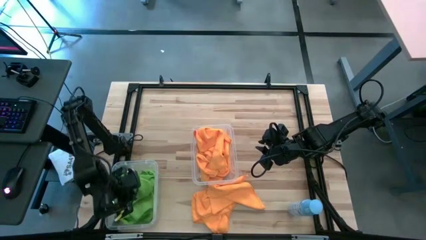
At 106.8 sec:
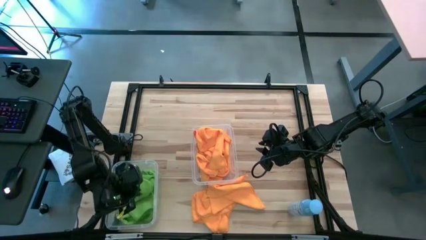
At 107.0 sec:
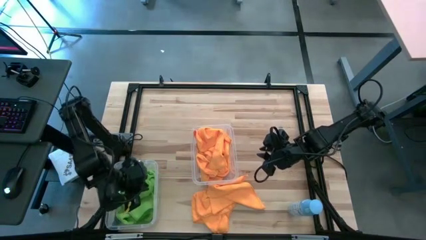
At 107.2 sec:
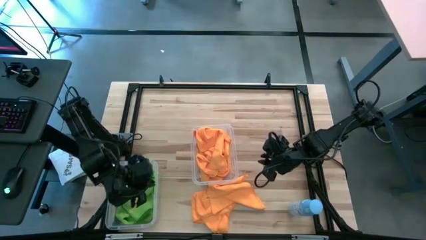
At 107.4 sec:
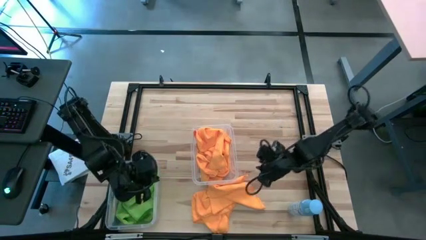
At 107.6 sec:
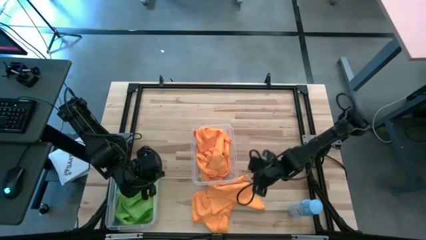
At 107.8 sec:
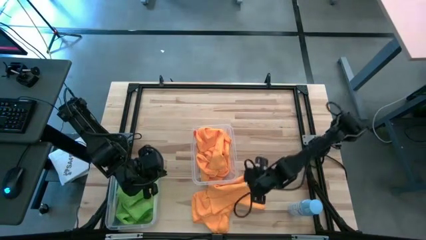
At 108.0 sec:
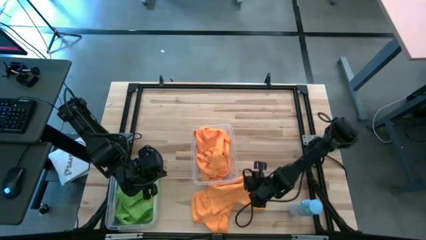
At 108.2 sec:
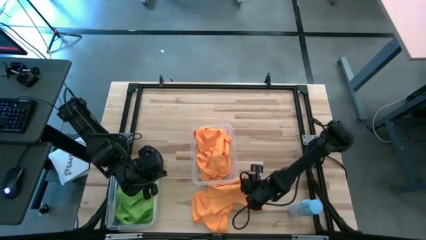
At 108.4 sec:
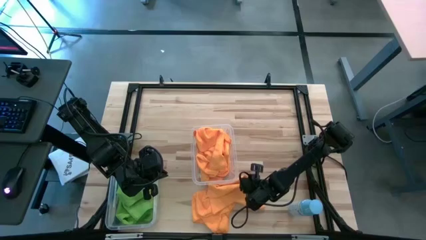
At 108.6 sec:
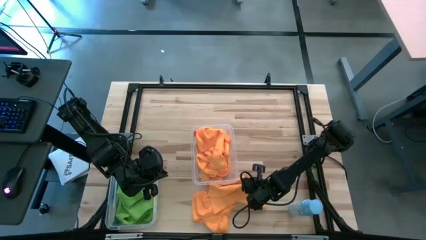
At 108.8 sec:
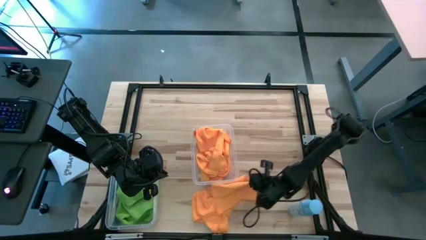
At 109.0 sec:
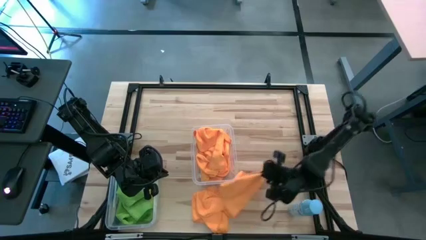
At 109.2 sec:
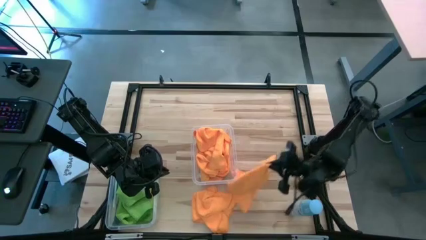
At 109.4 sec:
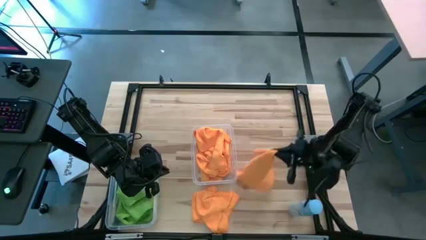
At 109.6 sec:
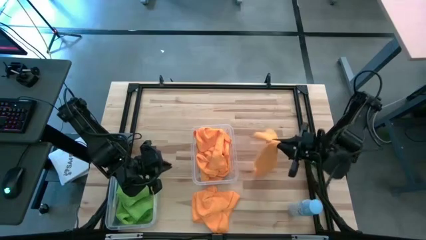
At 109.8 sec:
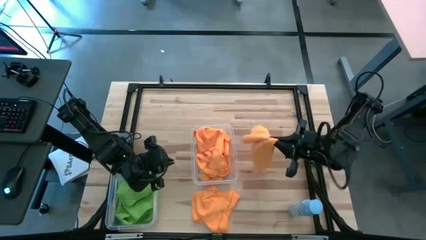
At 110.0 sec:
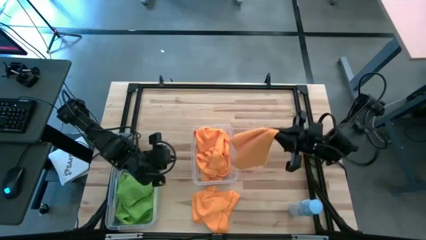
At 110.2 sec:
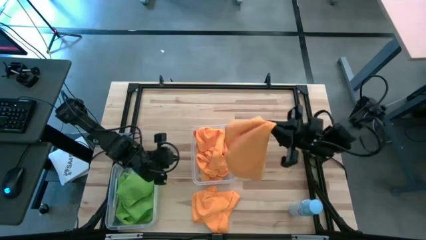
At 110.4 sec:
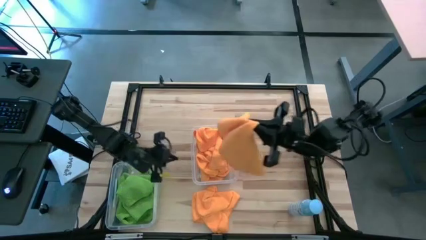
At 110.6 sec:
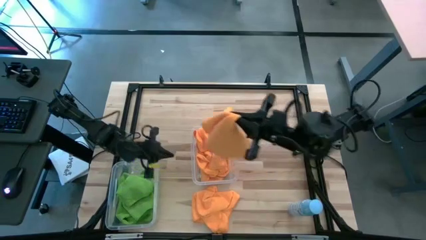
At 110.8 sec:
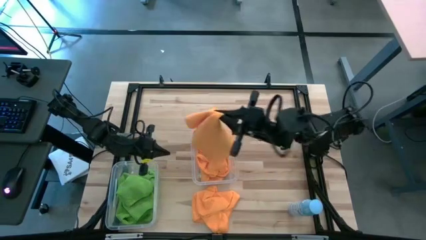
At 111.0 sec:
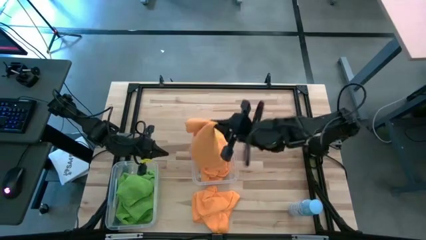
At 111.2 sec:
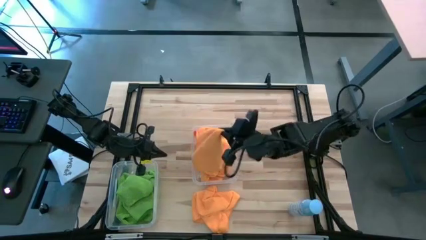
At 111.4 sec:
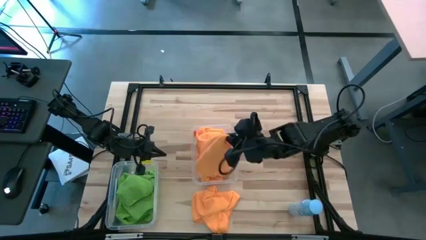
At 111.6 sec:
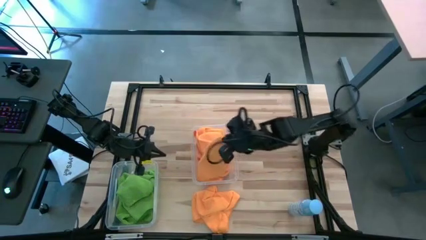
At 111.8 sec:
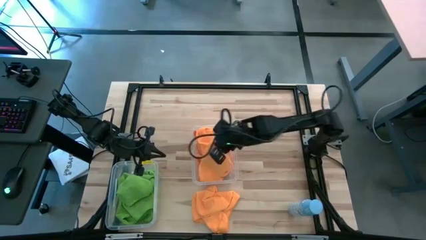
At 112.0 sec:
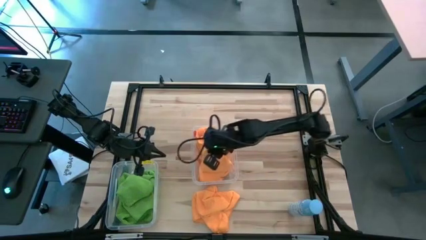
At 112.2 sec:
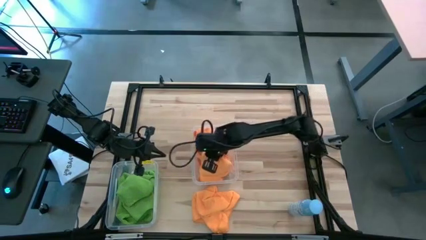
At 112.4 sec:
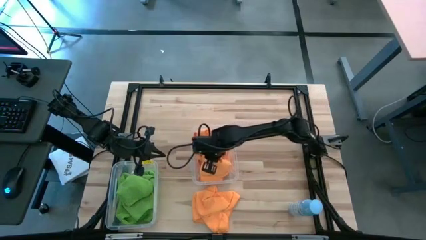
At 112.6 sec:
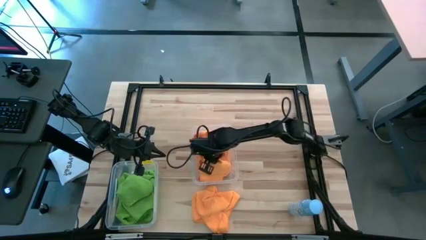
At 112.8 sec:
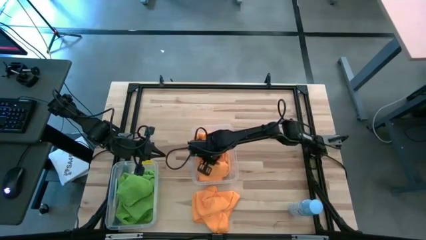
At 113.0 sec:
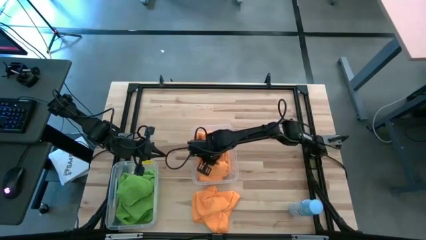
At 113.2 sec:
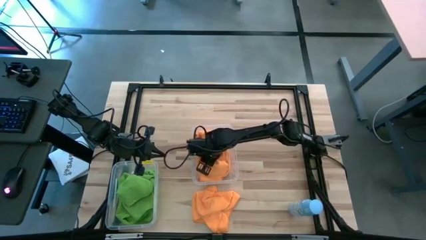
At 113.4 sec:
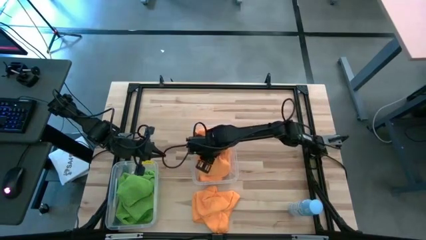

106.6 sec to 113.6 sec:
Task: Sort microfiber towel by color & place in baskets
Put the yellow microfiber towel into the right transparent bin

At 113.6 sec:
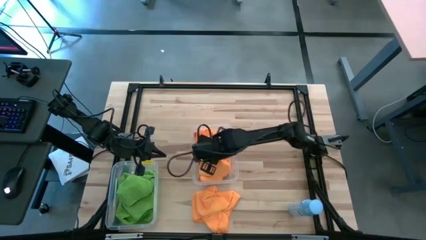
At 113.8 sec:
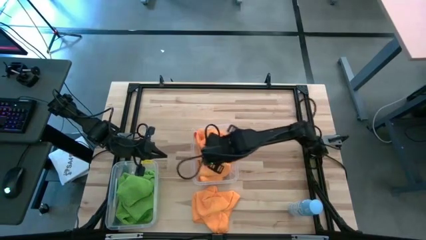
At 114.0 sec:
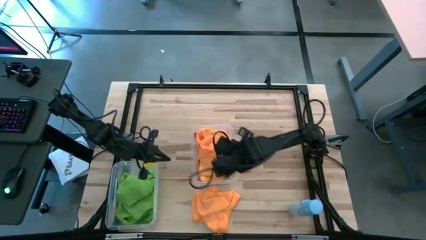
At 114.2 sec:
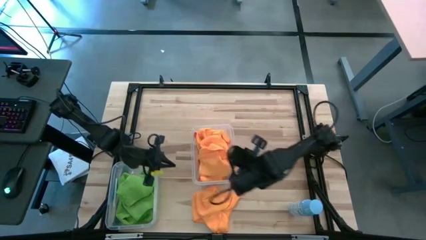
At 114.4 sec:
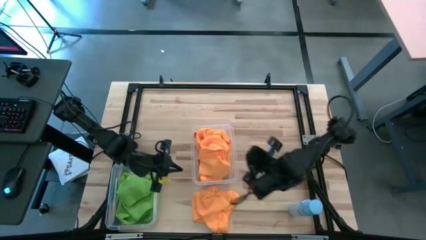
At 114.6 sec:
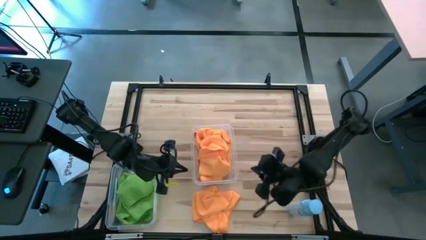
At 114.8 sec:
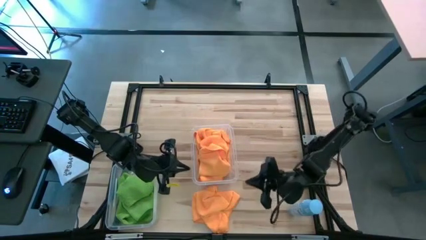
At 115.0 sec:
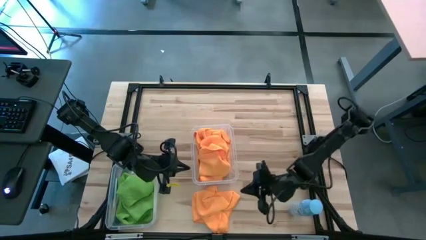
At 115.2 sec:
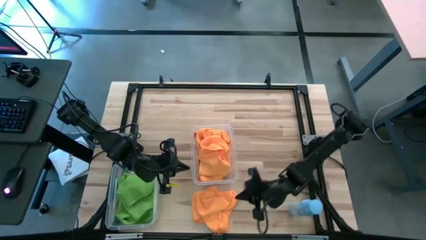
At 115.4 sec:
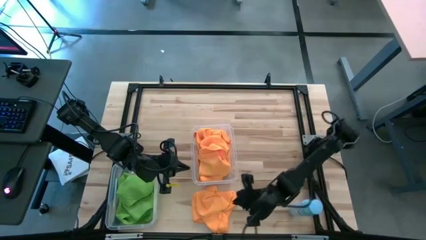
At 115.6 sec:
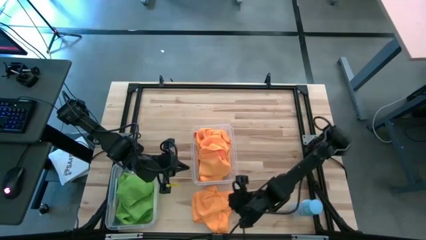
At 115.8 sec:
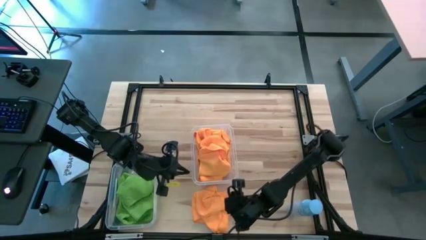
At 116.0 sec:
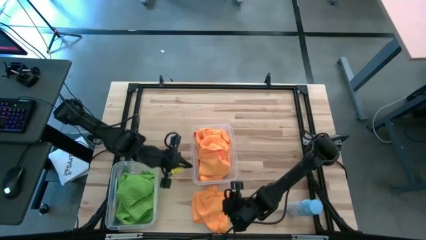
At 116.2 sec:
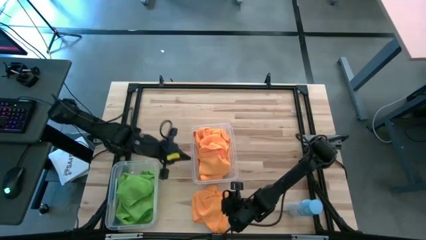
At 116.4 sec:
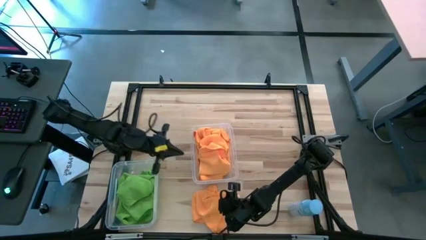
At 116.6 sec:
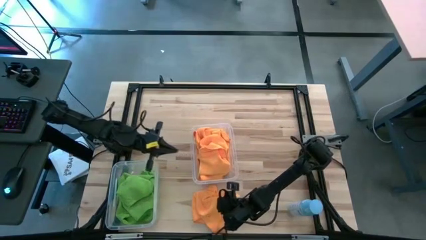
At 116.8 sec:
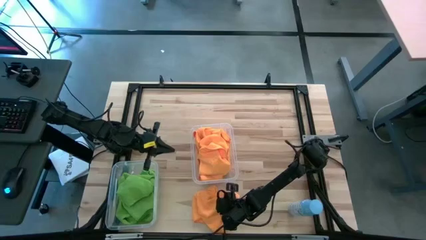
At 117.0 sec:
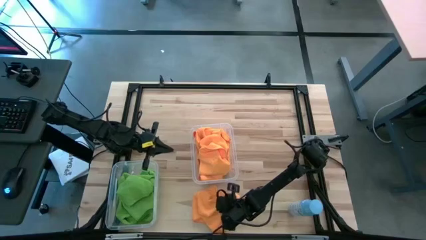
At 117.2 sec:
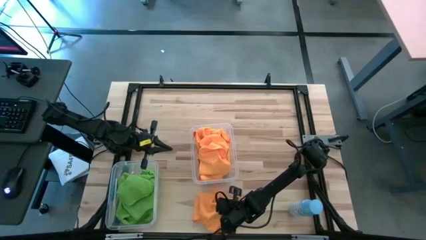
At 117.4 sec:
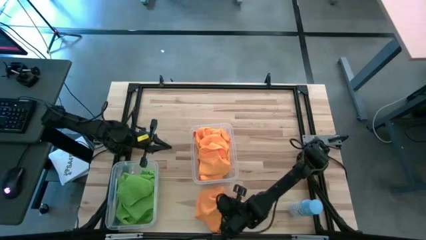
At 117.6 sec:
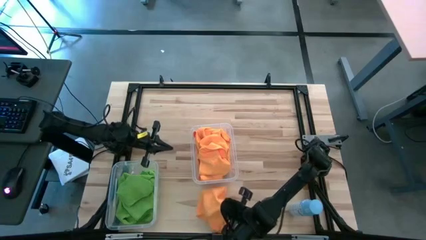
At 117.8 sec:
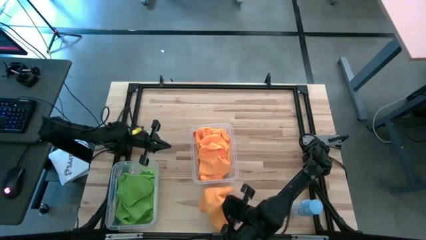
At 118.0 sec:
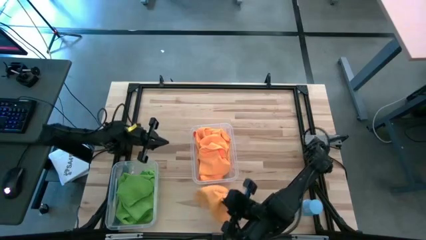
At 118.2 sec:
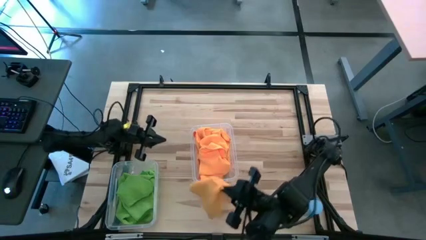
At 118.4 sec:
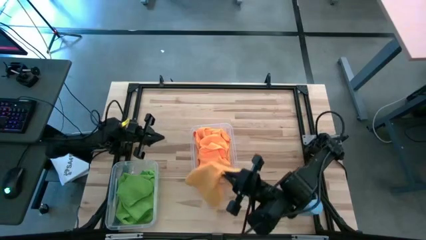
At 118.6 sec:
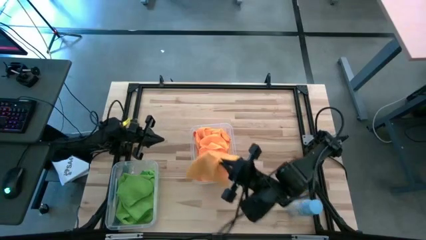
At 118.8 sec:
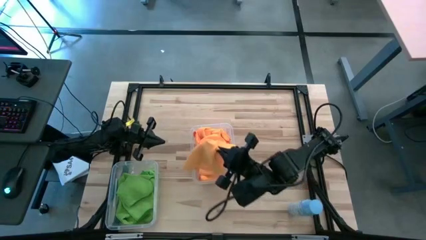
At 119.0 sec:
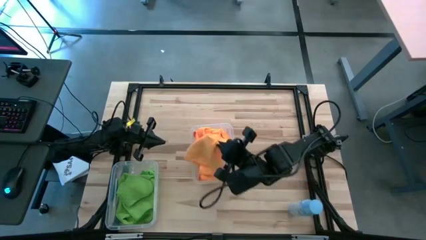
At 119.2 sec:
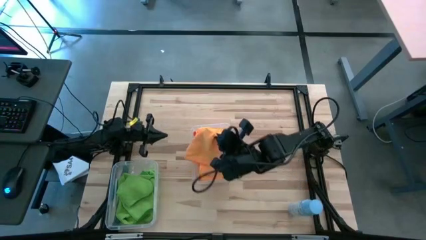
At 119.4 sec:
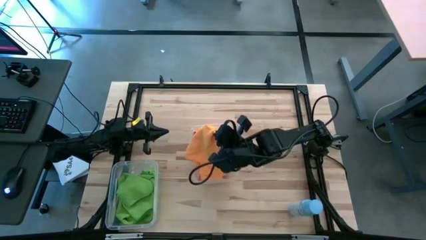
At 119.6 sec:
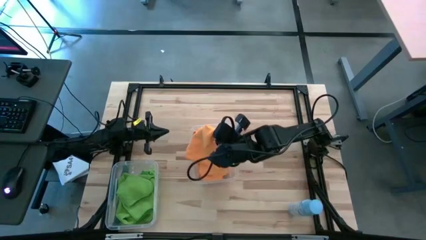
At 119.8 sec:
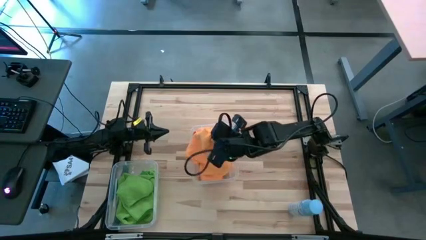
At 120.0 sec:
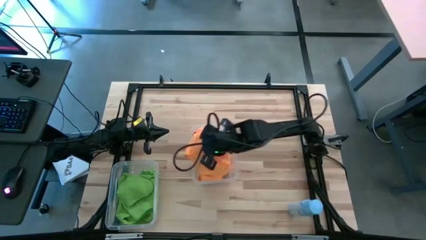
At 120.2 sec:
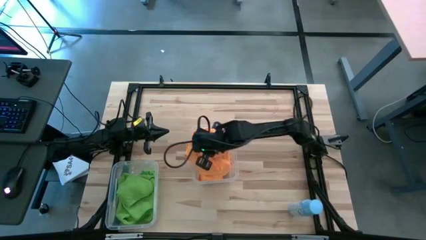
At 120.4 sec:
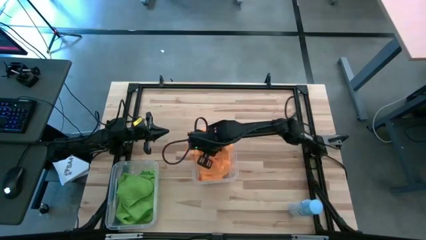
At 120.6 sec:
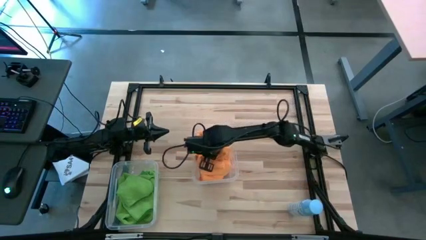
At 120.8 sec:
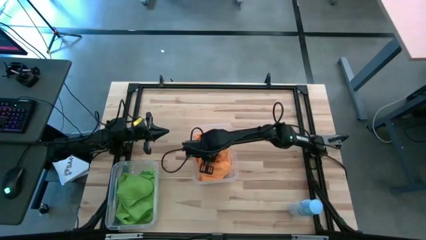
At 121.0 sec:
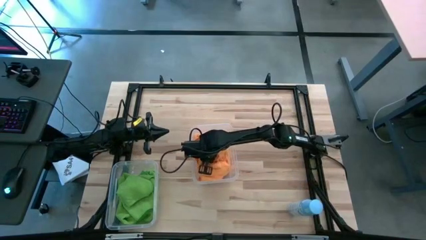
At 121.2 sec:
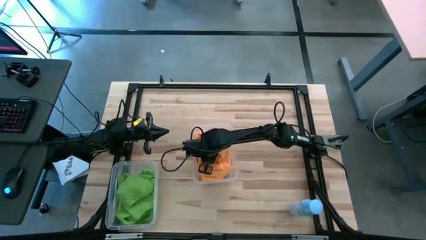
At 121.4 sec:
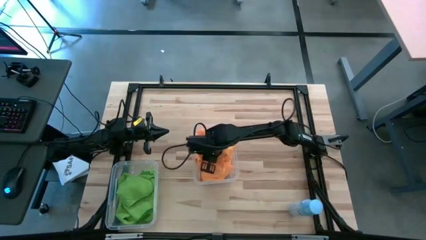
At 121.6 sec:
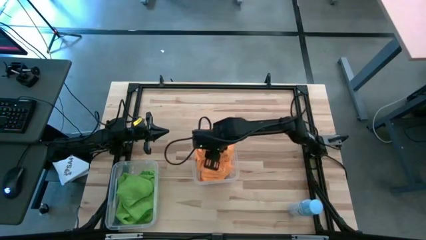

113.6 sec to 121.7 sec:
Put the yellow microfiber towel into the right transparent bin

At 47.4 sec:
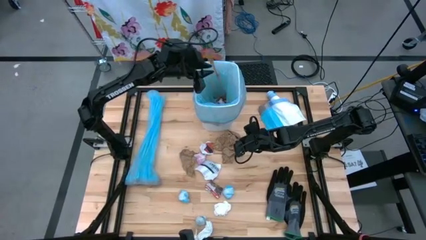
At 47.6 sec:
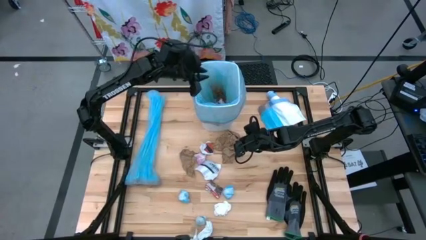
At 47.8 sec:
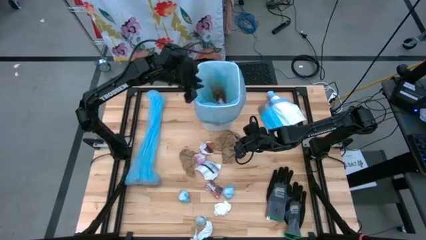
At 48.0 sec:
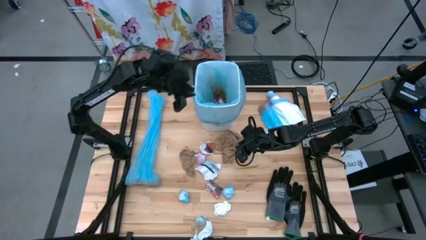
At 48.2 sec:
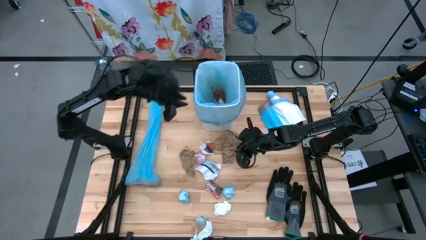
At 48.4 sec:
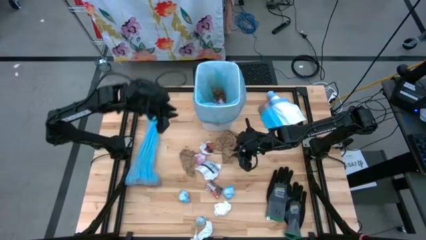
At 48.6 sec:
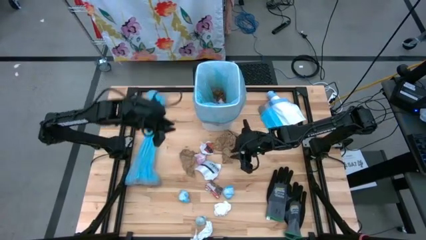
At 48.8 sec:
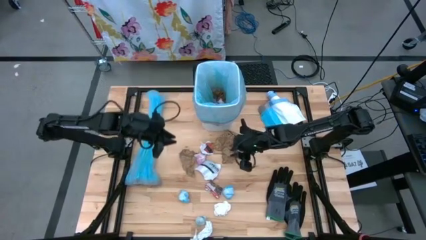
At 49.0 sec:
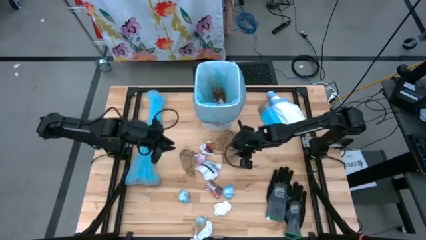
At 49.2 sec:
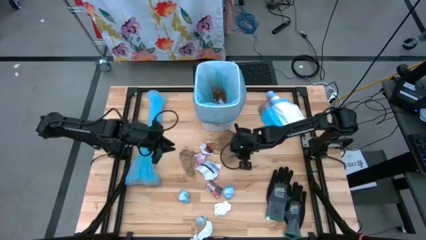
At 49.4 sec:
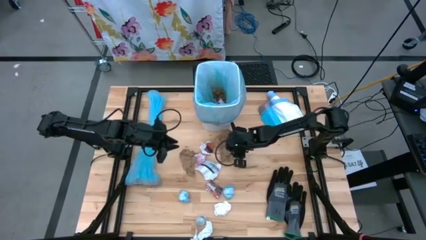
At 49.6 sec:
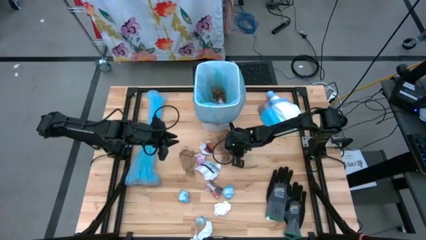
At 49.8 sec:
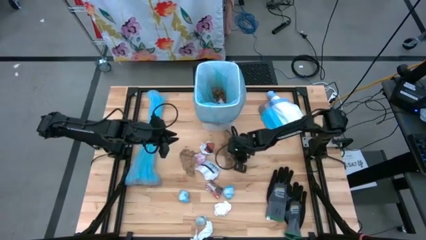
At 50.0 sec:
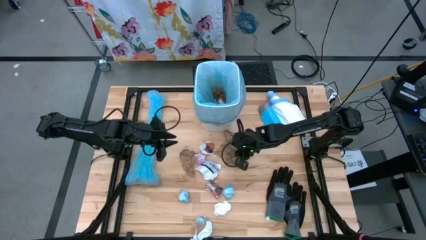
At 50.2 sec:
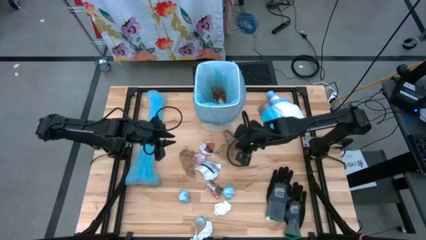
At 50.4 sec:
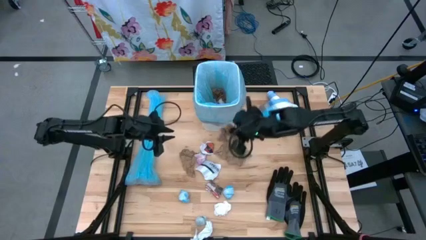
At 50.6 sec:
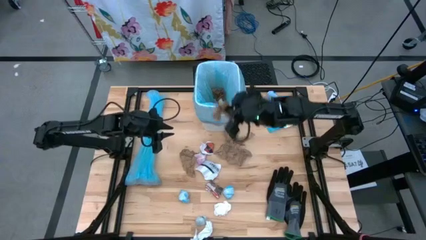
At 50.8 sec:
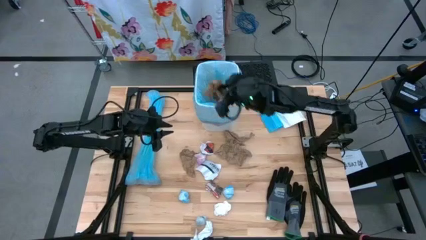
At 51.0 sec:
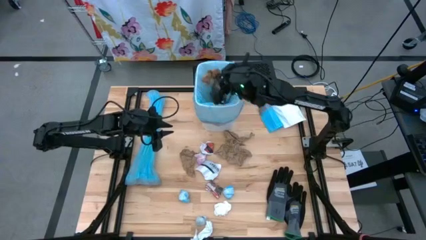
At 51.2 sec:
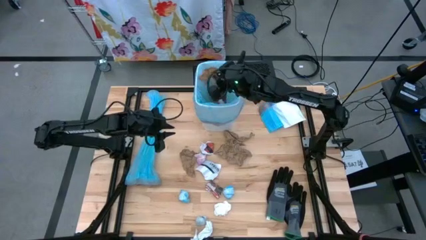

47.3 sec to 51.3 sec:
Task: place trash/remove bag and relplace
Put the brown paper into the blue trash bag inside the white trash bin
